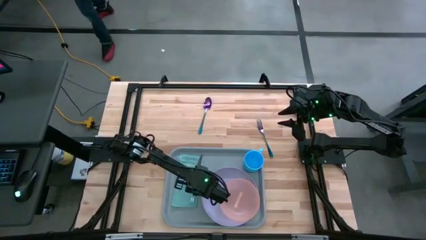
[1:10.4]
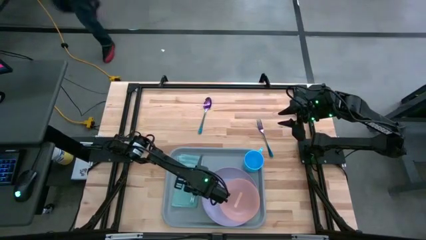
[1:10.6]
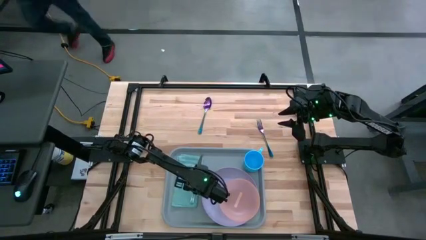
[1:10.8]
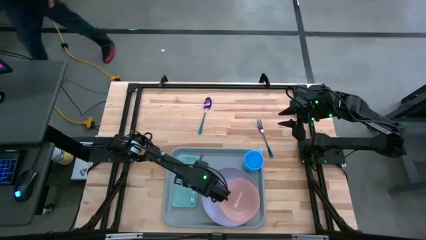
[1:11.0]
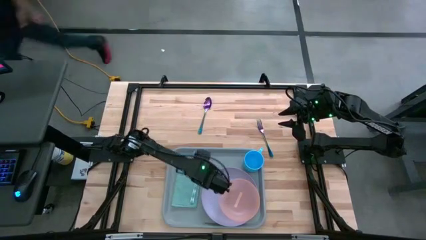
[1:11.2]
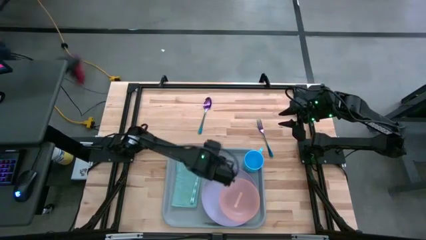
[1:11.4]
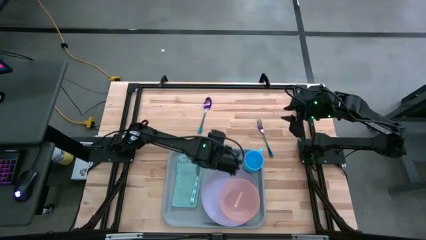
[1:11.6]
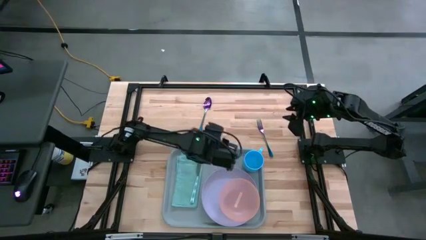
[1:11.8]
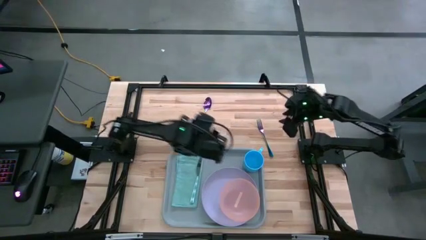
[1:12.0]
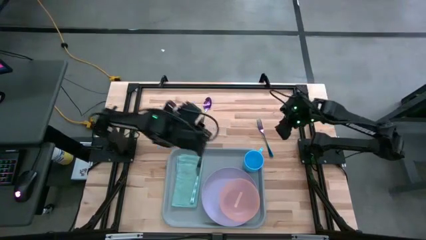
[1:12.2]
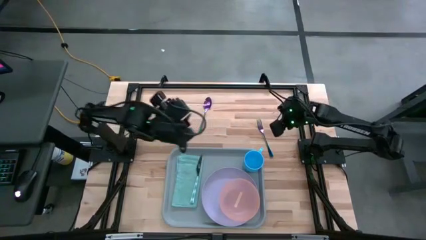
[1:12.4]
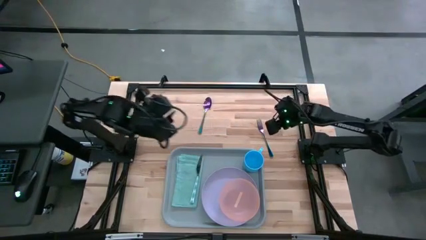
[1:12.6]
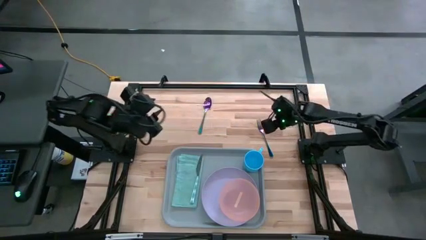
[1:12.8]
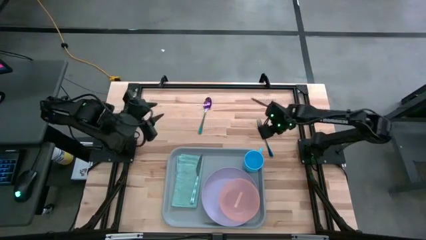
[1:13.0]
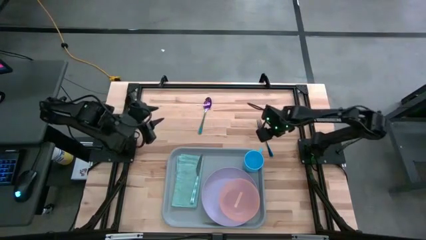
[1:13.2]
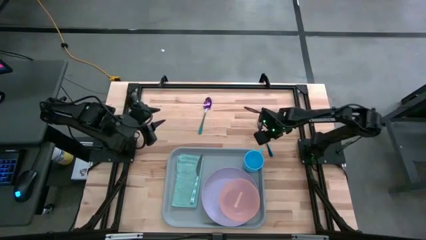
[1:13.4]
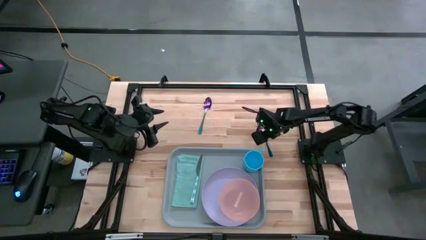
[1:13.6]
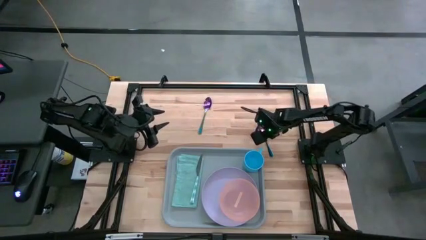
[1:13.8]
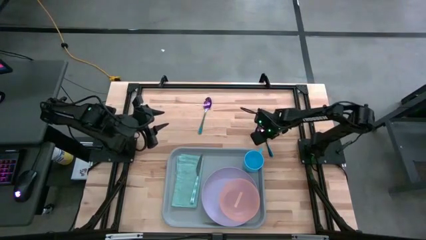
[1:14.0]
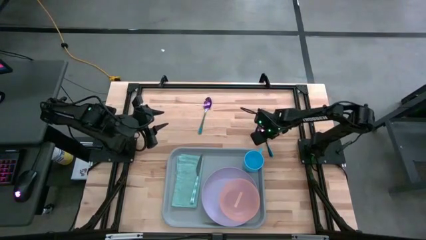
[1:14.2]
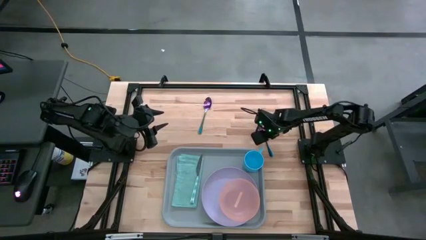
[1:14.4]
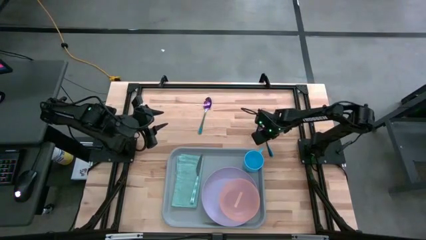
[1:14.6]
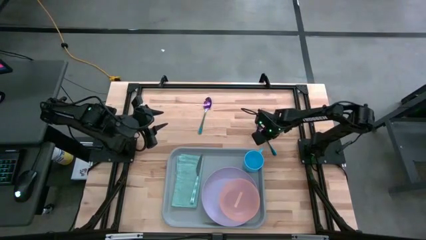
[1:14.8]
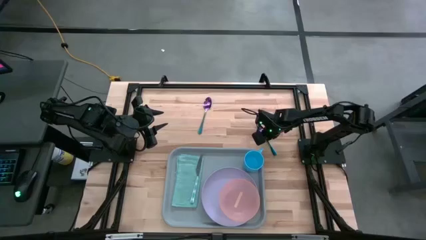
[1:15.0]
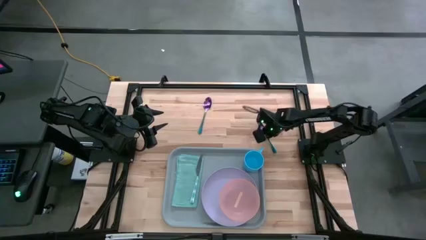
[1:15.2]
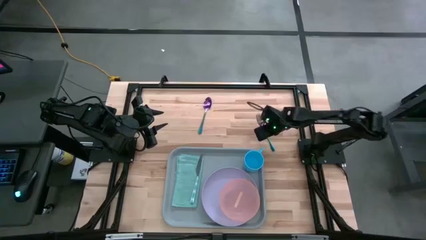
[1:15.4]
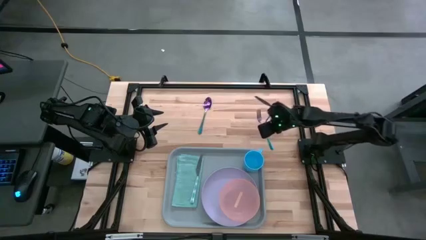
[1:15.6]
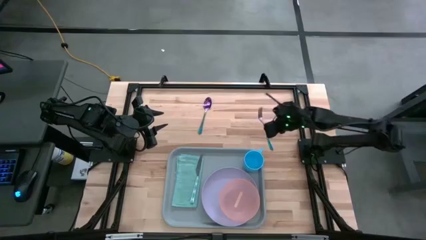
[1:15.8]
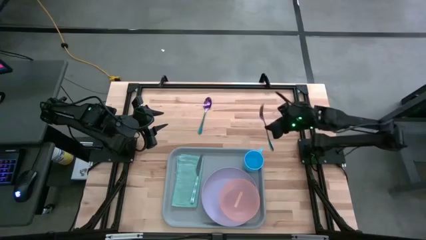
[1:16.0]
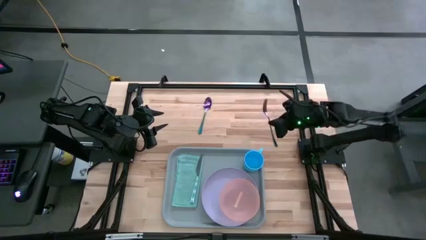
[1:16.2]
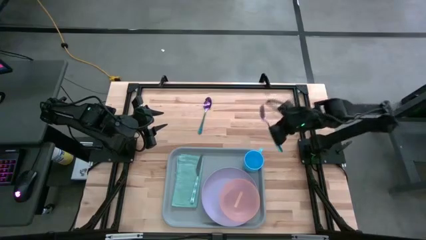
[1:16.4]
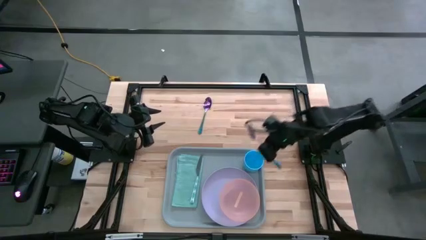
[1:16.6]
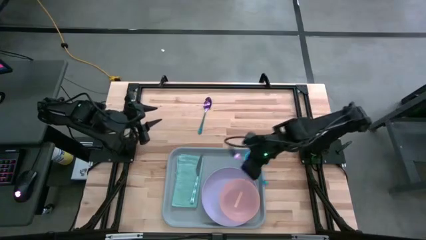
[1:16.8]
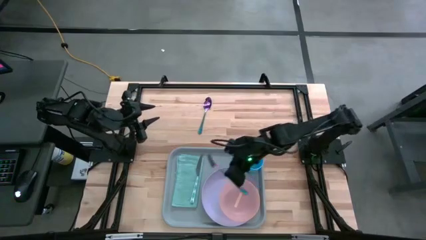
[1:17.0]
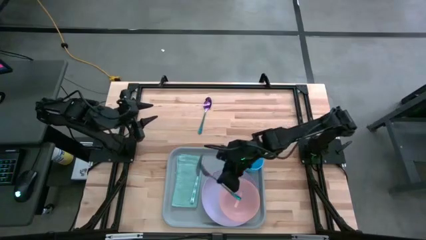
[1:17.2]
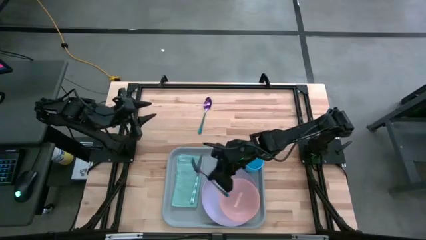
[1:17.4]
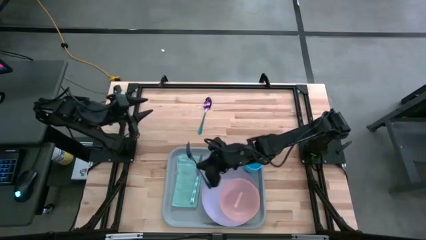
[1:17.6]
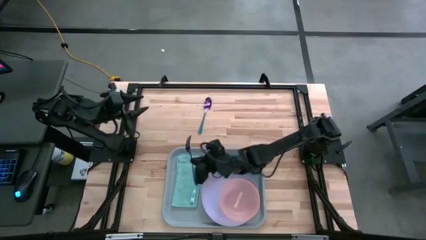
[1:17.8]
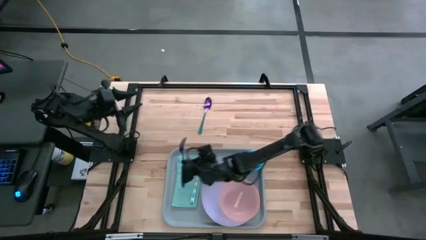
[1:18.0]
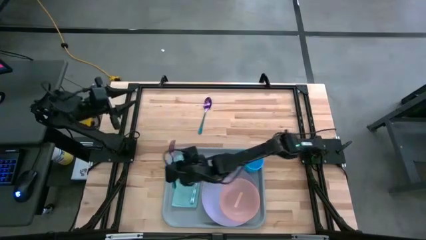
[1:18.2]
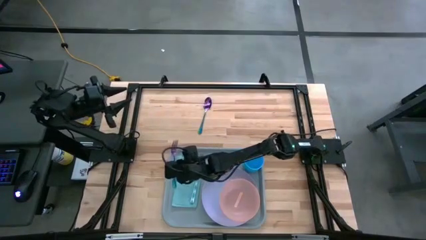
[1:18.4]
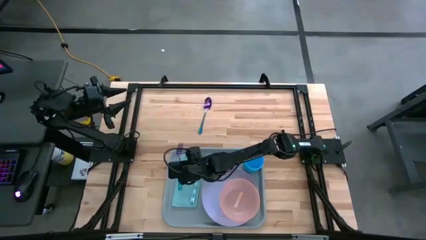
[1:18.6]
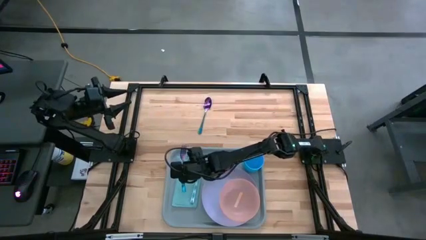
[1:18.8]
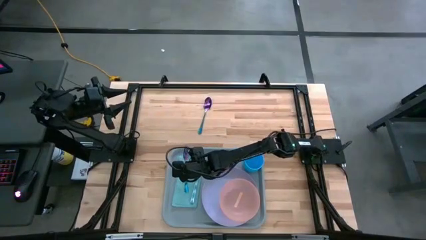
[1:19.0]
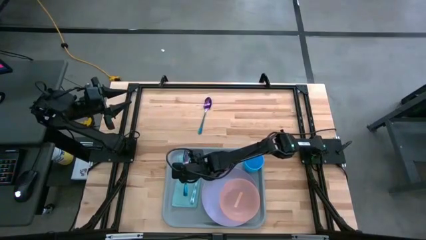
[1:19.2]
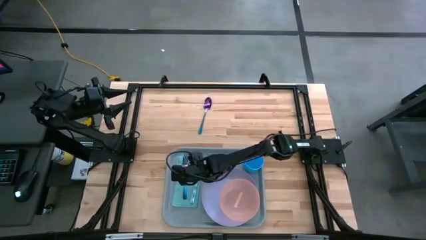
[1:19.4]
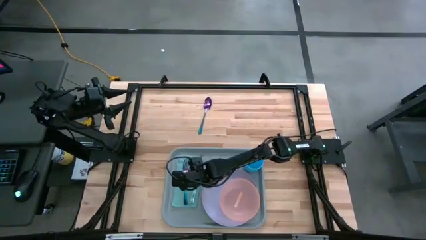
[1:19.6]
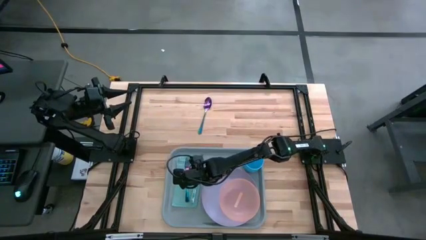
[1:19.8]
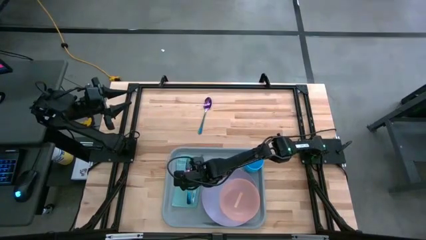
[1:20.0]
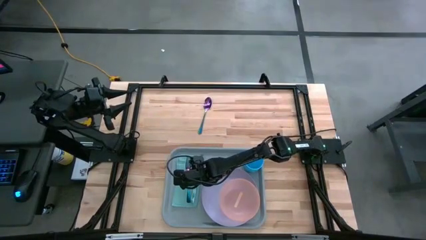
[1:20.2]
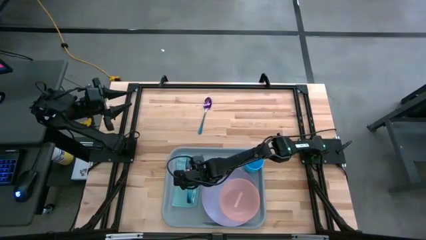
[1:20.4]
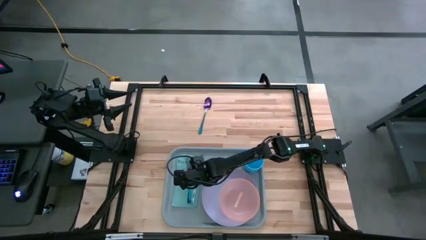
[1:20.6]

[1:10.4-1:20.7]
Task: Set up tray
Put the blue fork on top of the blue napkin to the left of the blue knife

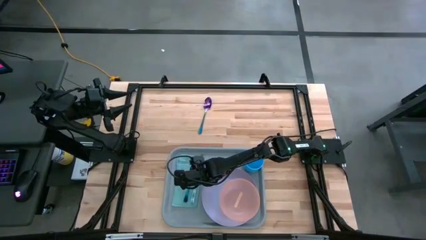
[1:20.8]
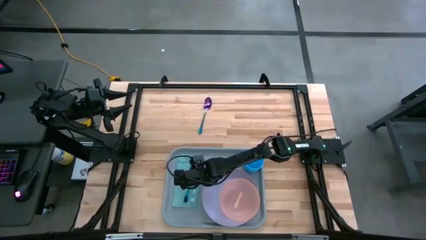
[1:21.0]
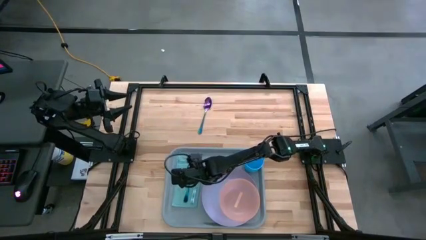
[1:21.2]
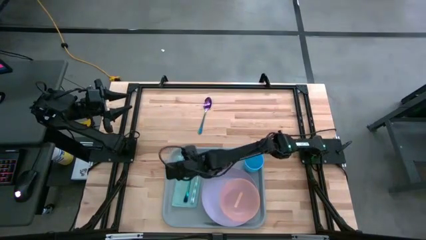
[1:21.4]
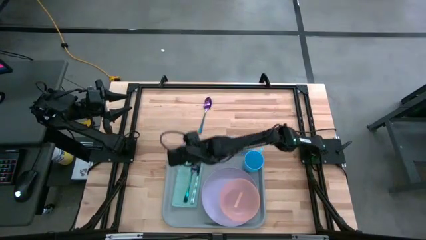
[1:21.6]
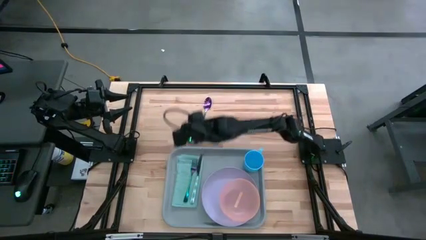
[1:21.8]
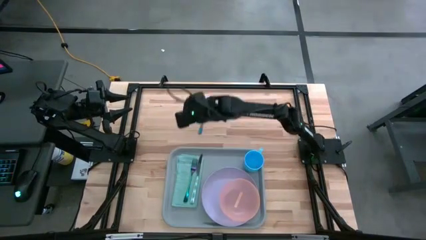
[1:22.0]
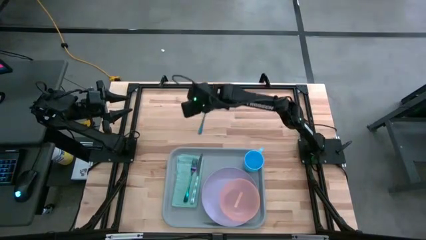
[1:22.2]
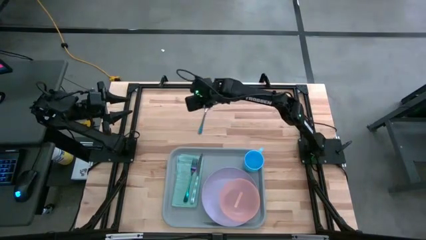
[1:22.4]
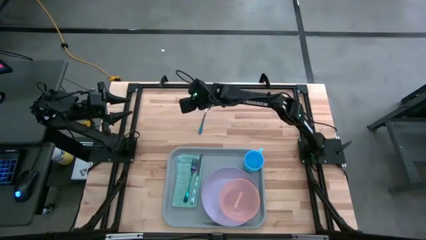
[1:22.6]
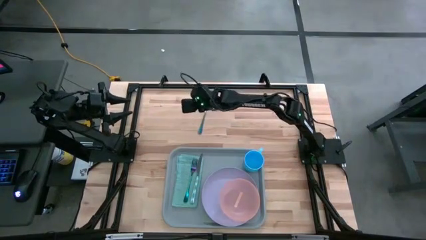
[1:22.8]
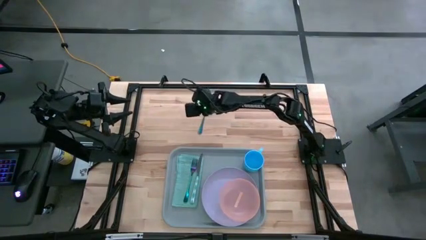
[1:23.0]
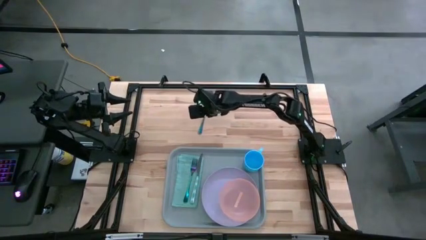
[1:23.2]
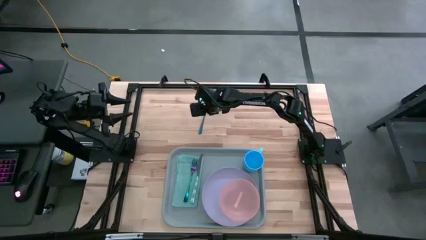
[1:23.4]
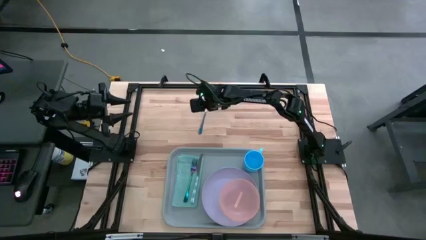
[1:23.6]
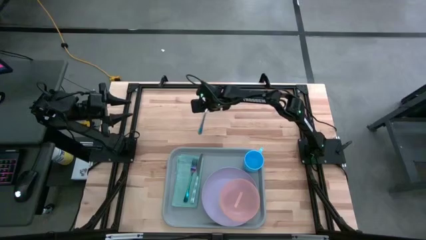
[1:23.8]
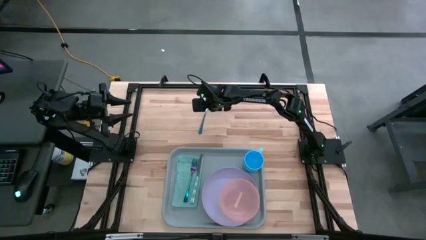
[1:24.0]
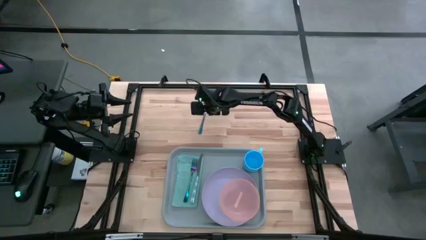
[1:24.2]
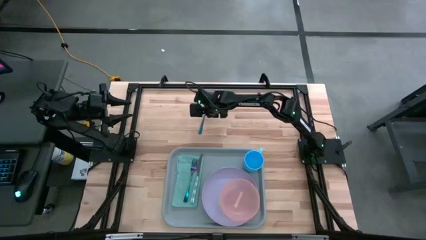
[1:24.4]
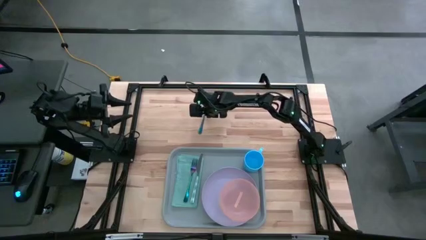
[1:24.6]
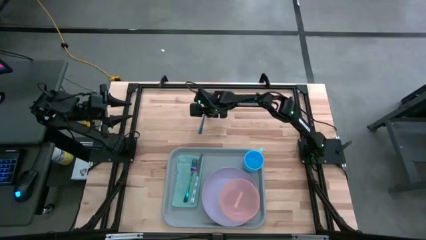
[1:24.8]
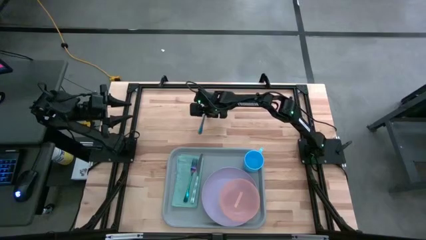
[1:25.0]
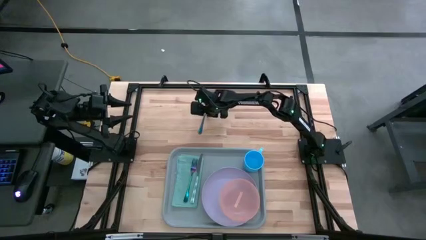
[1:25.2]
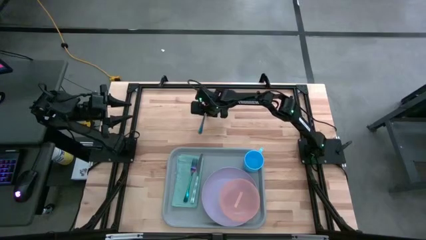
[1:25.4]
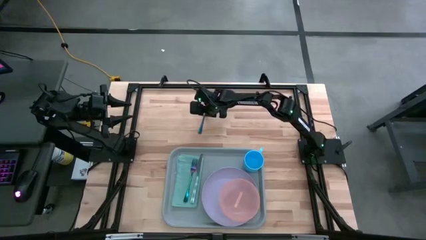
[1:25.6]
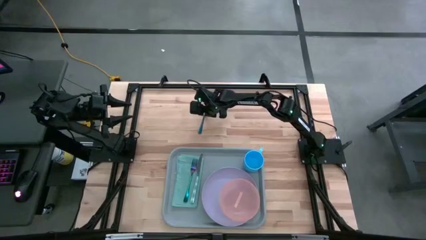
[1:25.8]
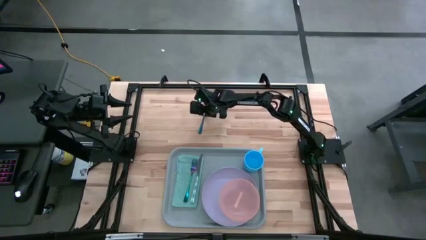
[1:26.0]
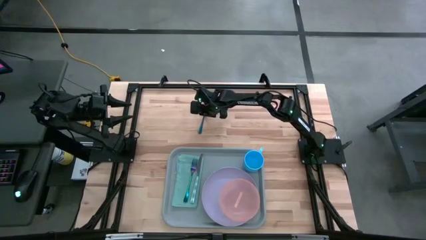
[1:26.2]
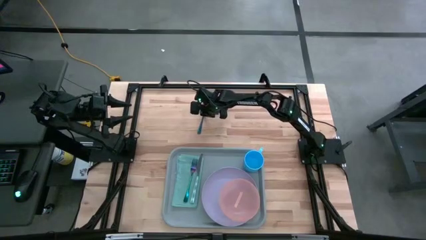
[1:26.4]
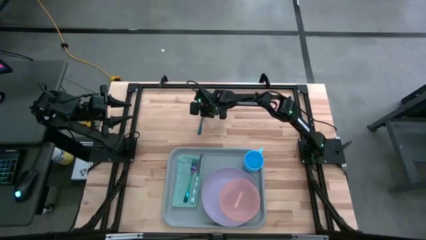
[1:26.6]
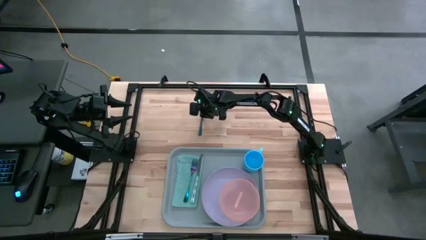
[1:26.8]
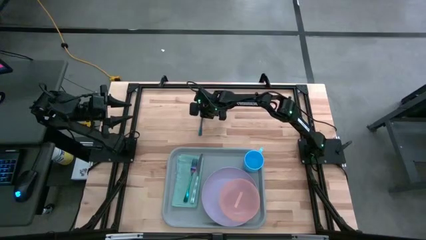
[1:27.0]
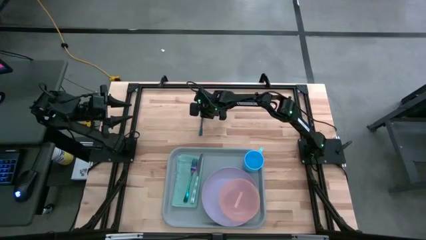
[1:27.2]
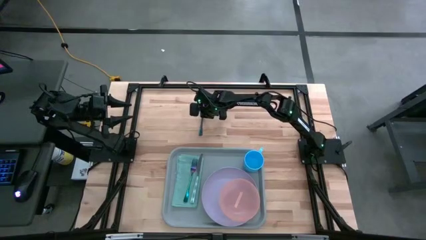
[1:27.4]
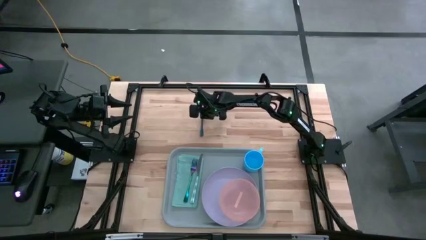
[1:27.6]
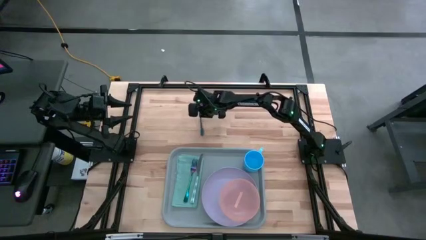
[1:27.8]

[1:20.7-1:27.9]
Put the blue spoon on top of the blue napkin to the left of the blue fork
